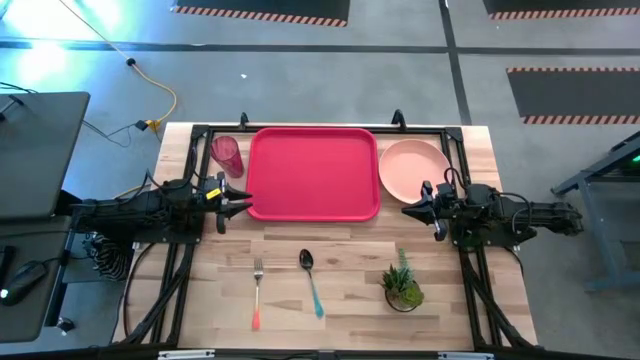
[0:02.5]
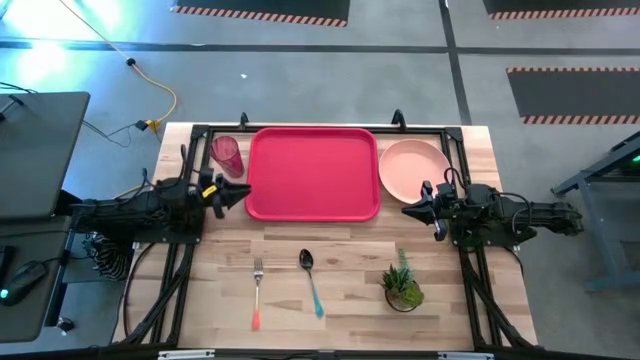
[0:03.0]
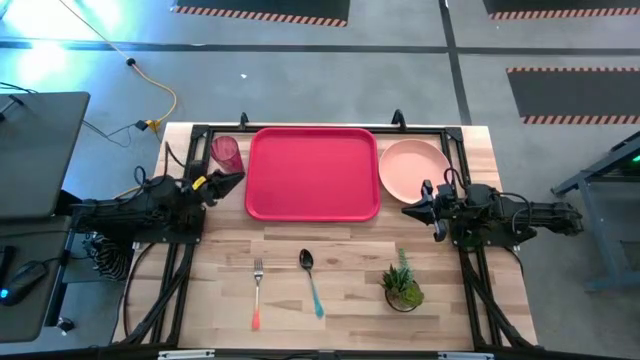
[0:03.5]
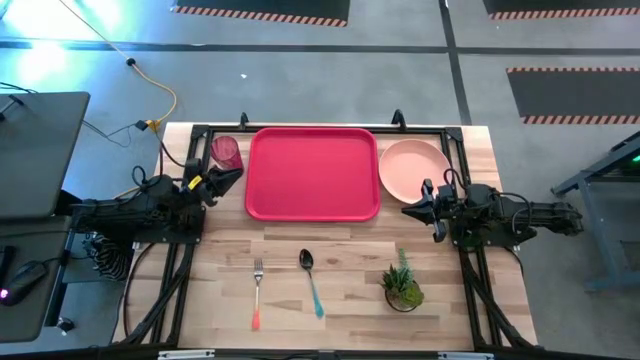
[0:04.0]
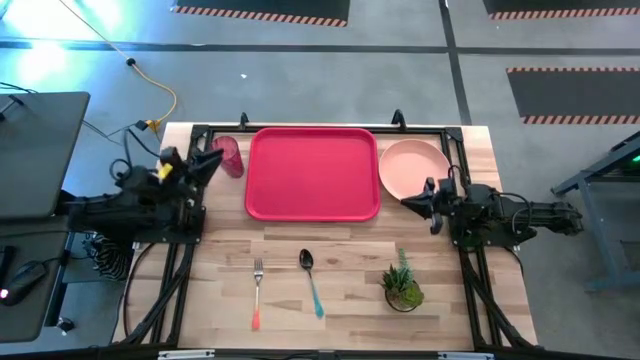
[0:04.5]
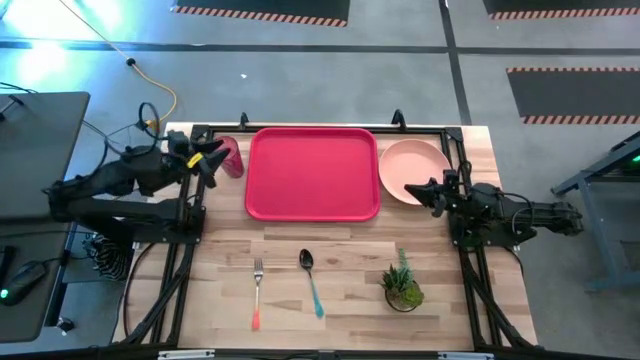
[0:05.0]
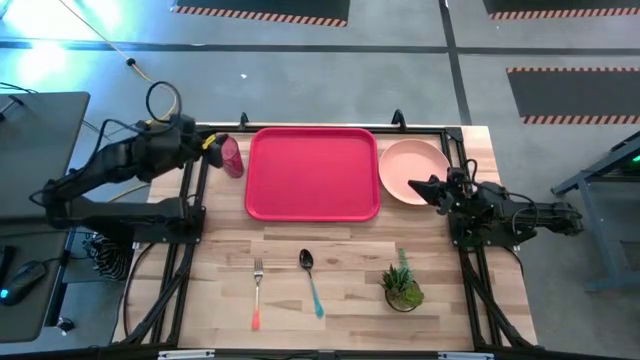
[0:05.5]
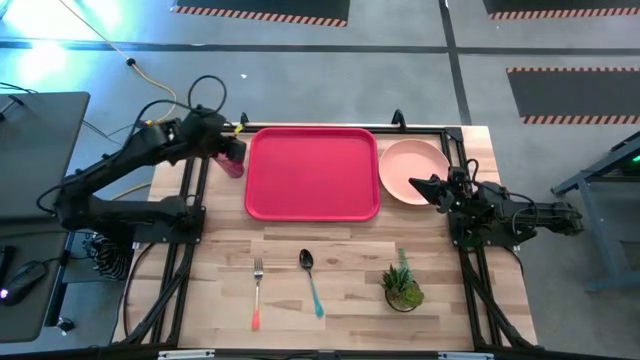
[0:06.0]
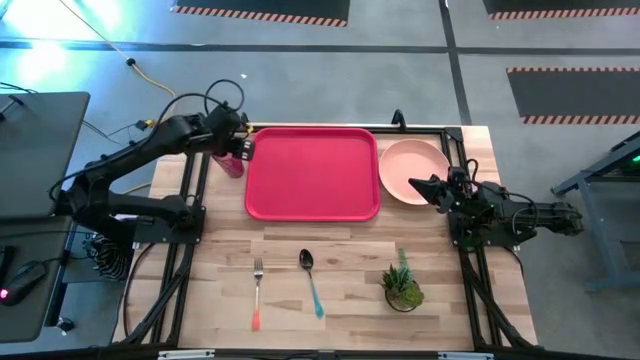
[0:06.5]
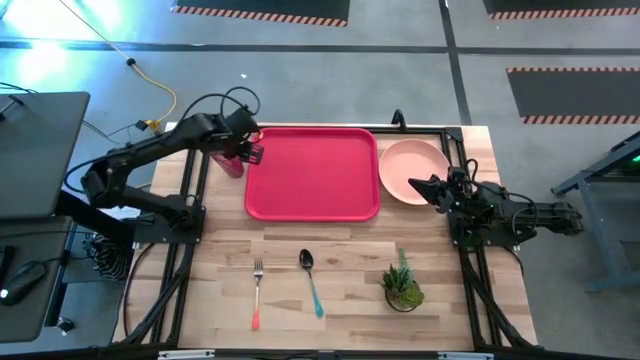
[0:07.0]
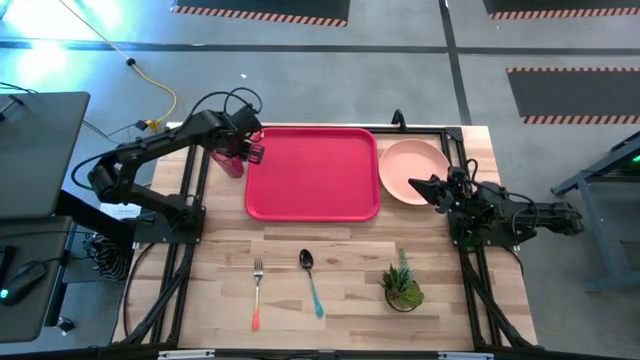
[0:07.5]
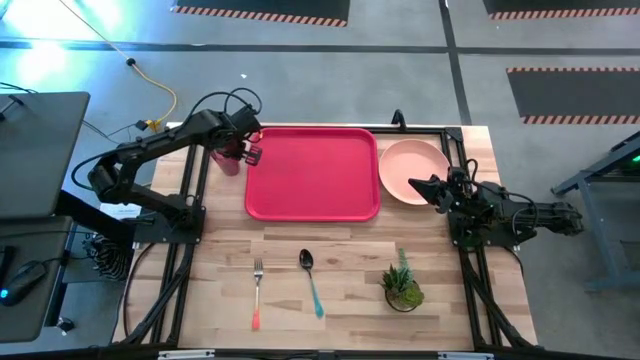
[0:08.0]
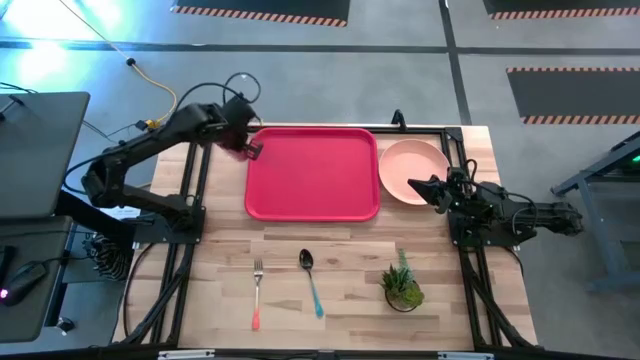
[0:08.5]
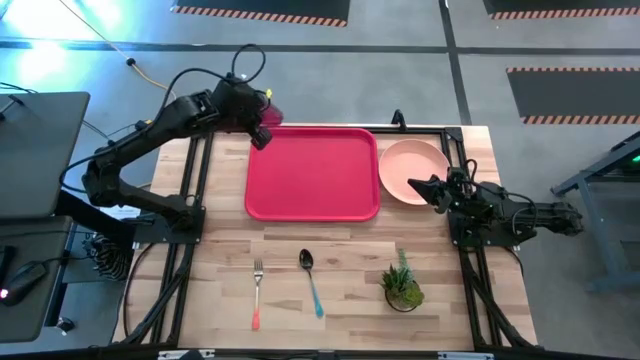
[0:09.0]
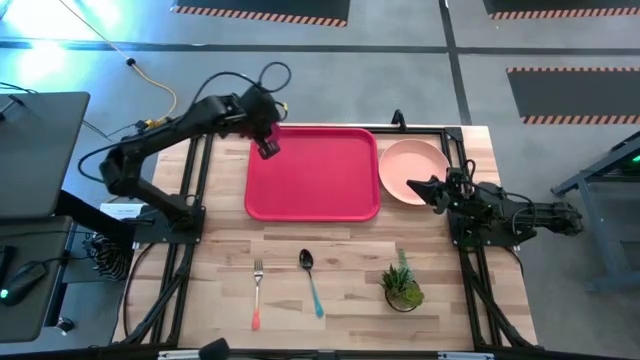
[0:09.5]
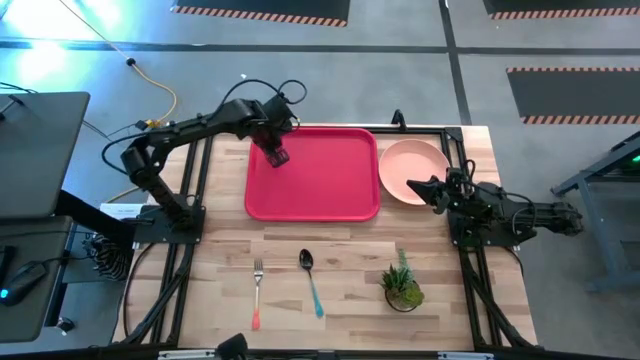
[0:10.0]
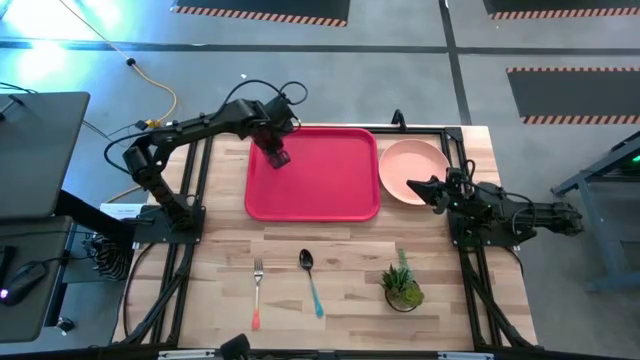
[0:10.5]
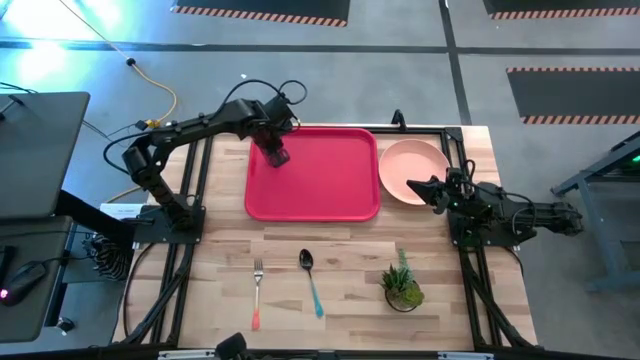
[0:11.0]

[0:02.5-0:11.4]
Task: Pick and place plate/cup/fork/spoon on tray
Put the red cup on the red tray

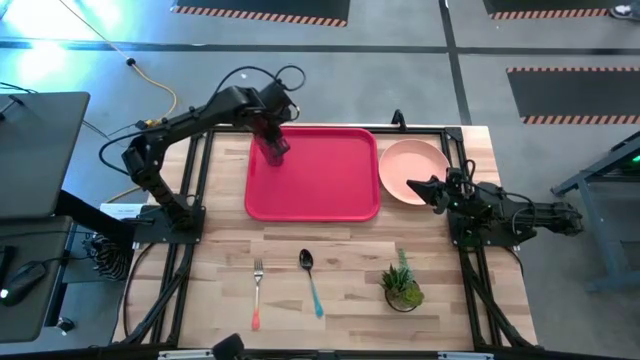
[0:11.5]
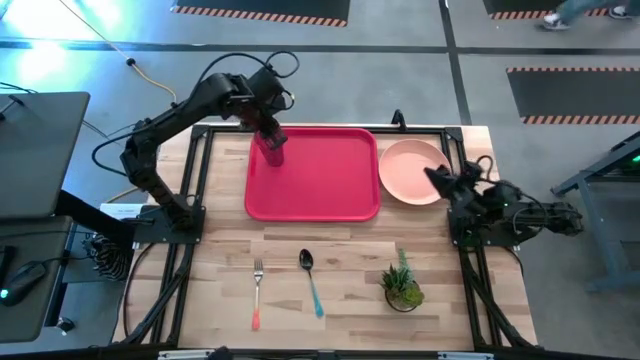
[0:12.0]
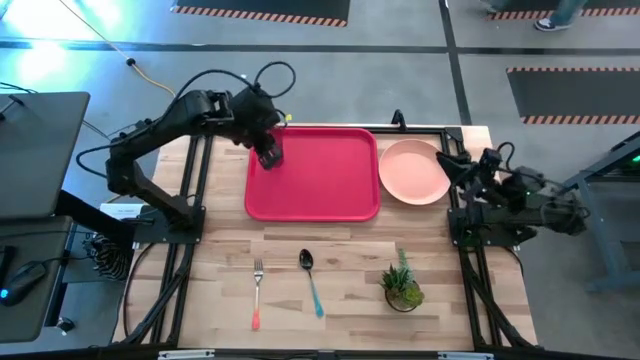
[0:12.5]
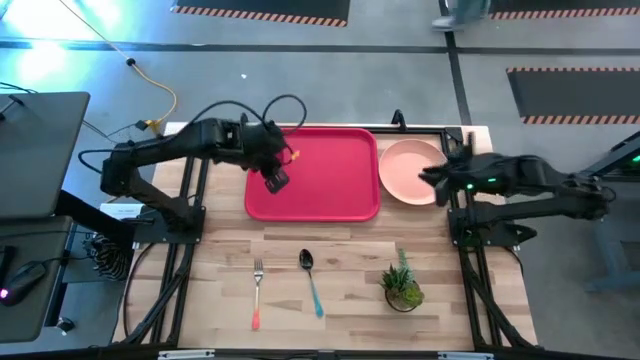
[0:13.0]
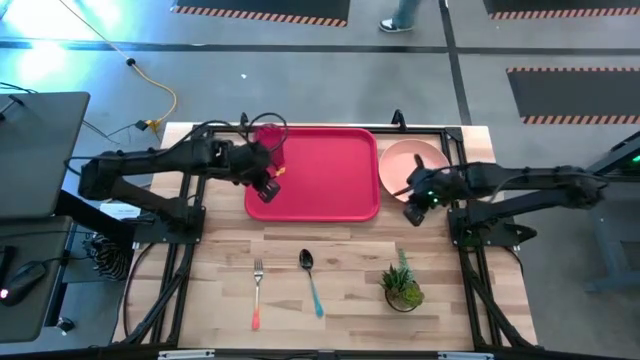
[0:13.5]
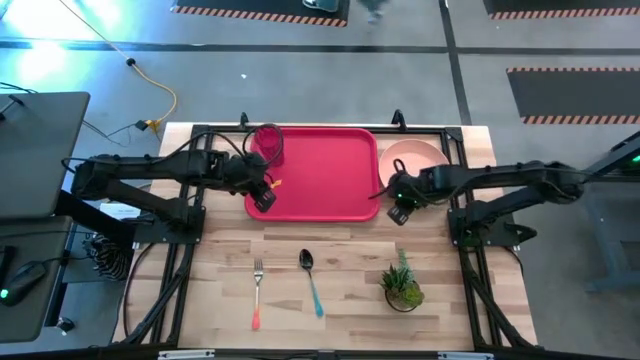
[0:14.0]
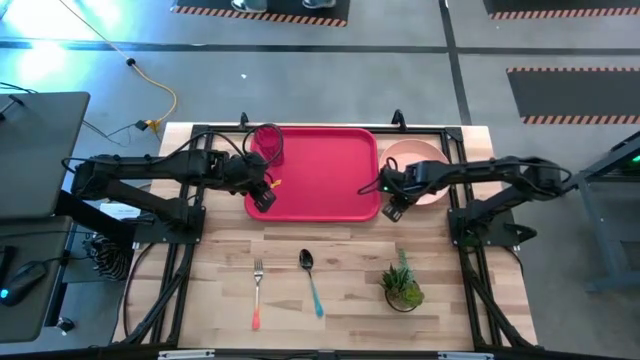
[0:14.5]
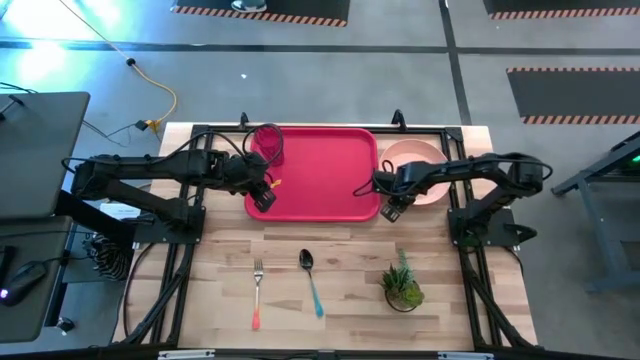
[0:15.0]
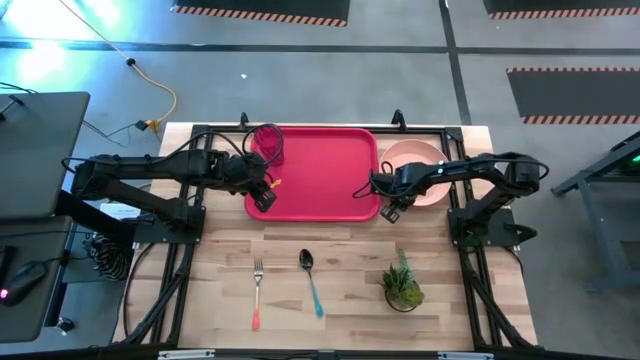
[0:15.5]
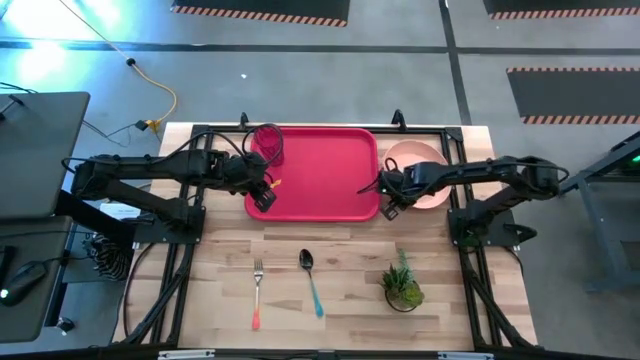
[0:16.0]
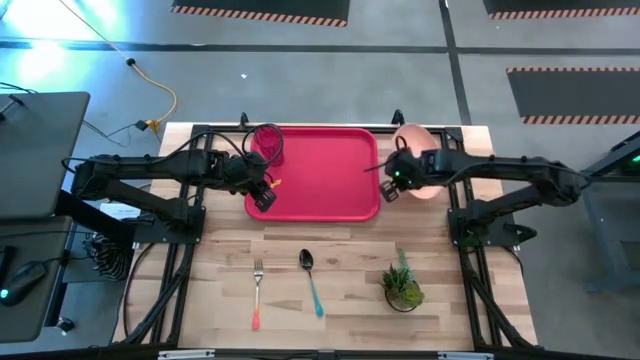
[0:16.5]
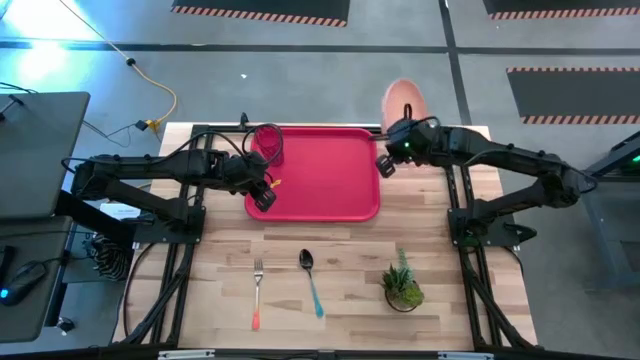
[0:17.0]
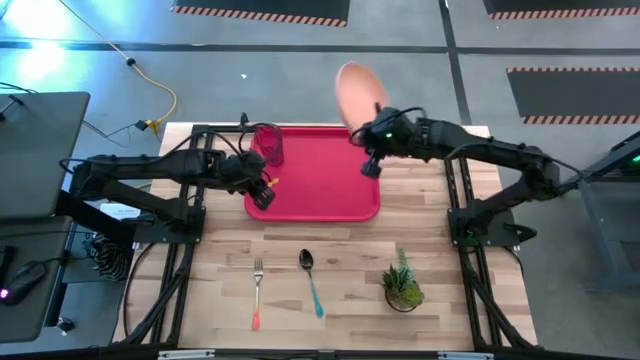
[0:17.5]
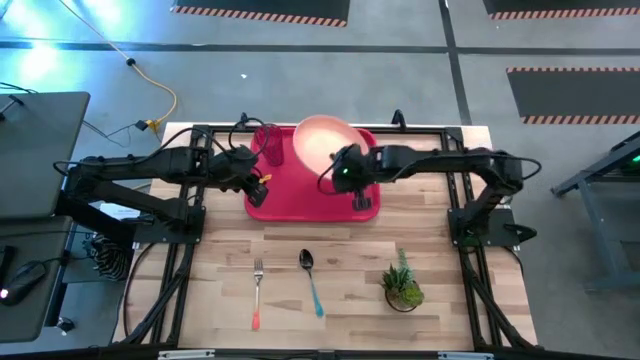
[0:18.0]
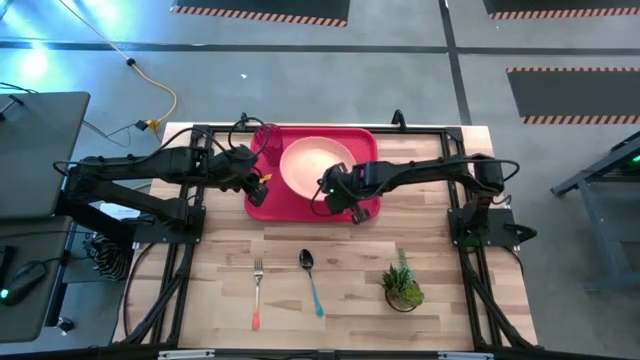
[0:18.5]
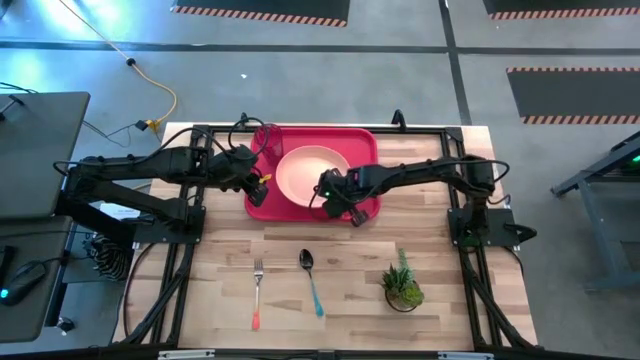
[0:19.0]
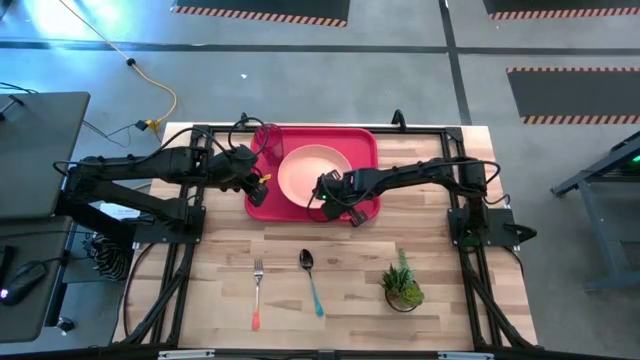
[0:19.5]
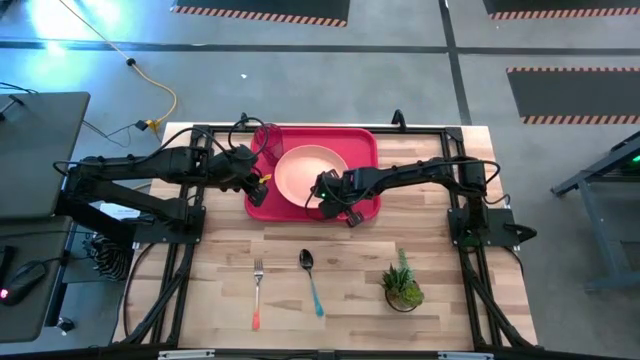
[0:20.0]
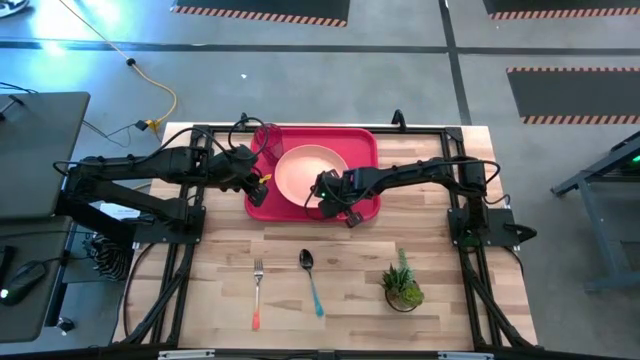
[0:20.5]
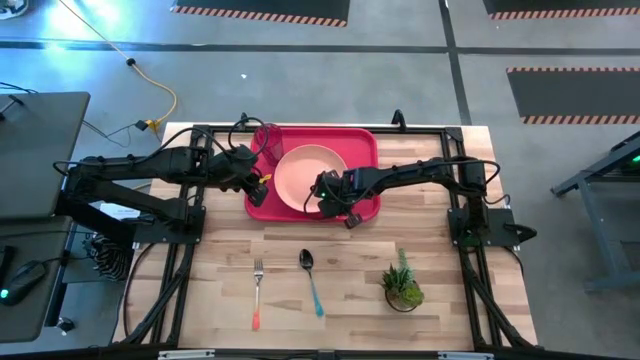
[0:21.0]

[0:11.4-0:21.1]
Put the pink plate on the red tray to the right of the red cup

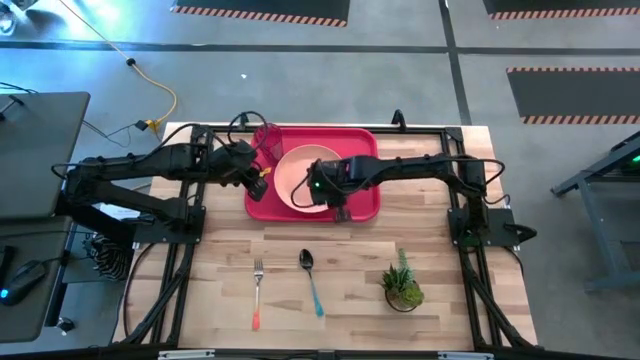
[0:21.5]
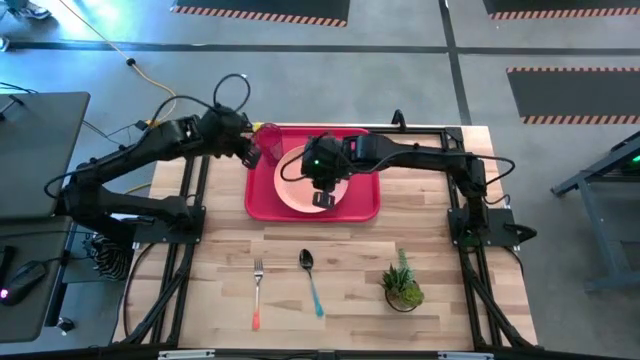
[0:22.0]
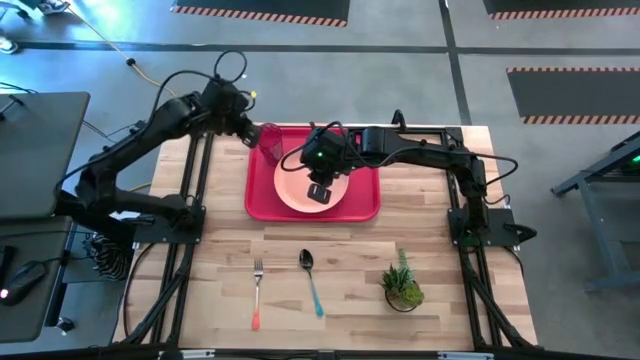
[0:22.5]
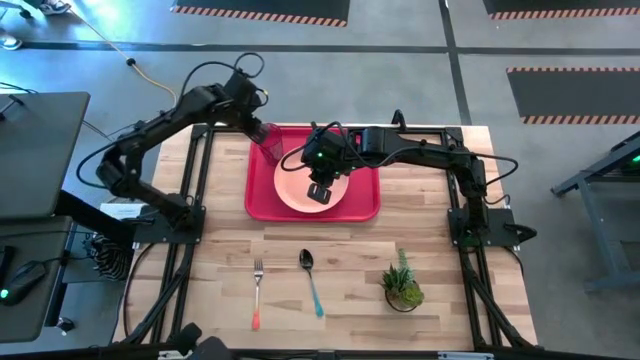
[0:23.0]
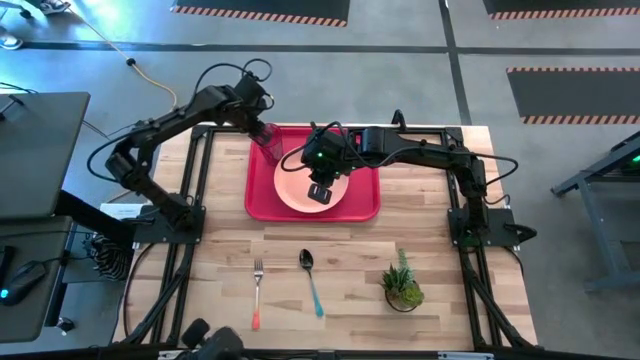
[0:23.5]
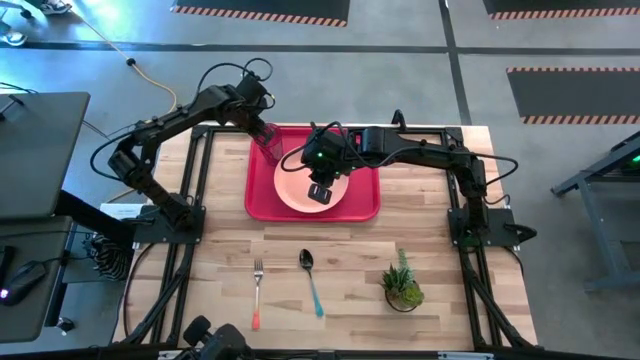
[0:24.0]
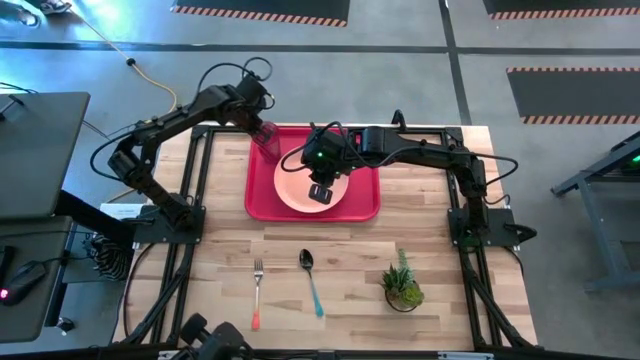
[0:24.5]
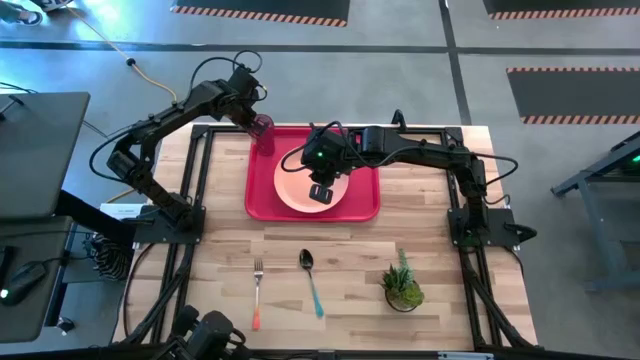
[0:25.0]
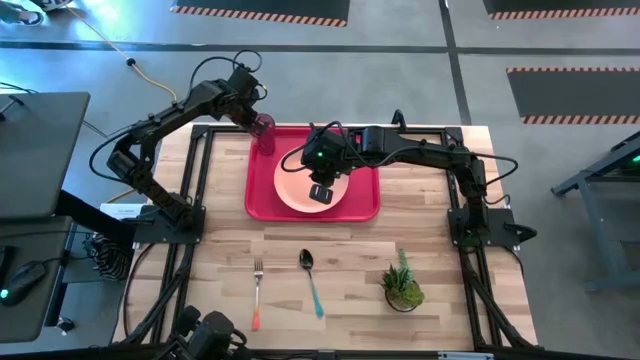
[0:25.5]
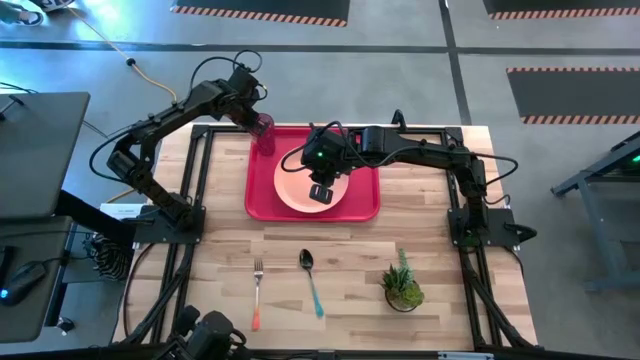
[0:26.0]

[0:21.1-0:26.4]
Adjust the red cup on the red tray
